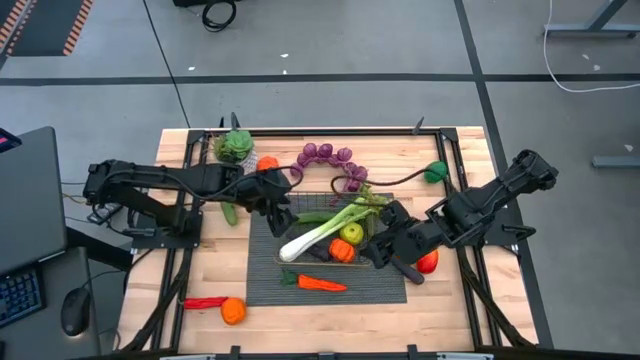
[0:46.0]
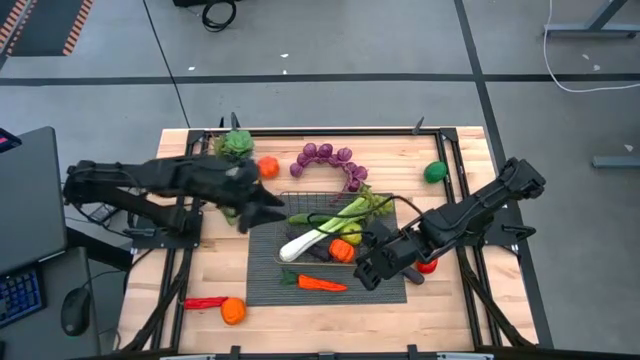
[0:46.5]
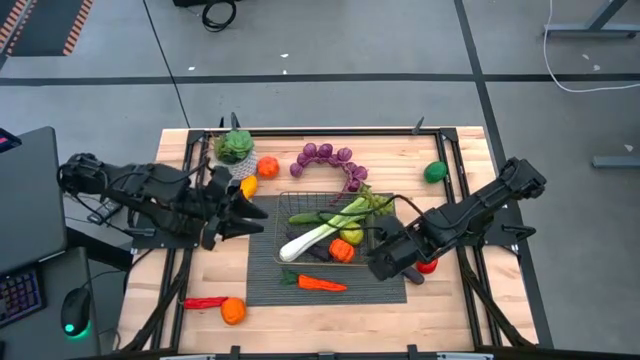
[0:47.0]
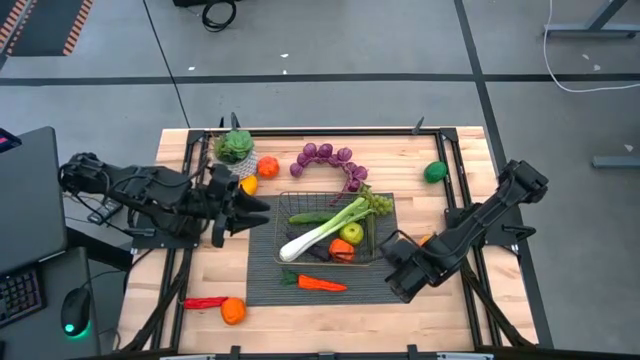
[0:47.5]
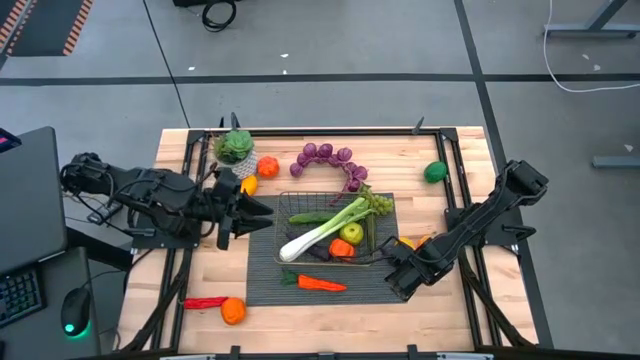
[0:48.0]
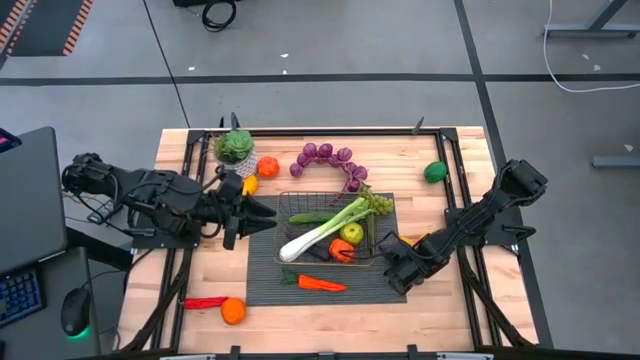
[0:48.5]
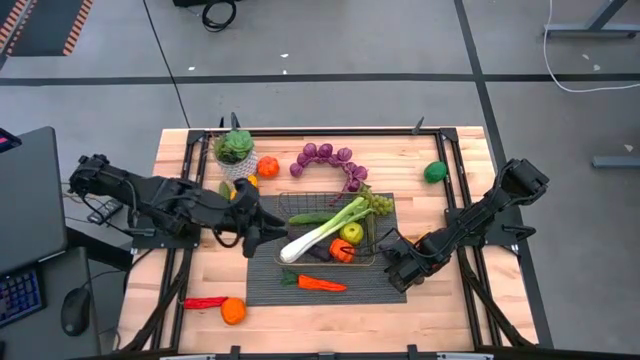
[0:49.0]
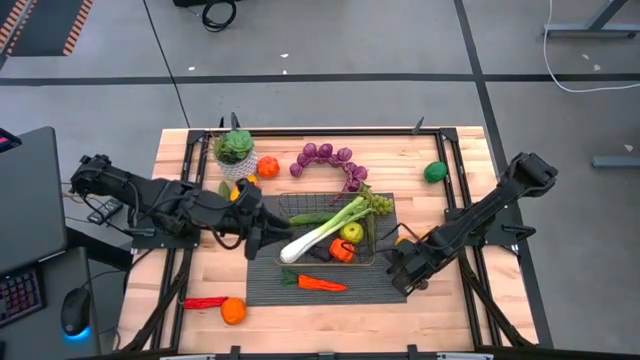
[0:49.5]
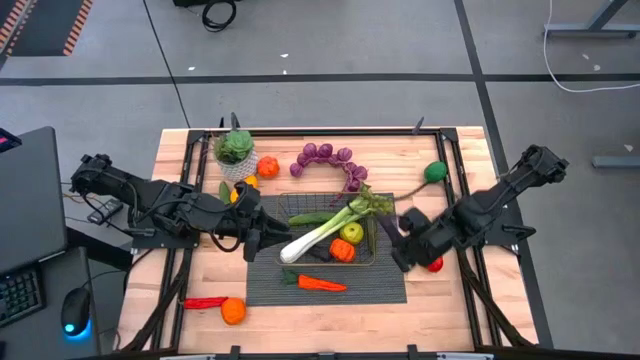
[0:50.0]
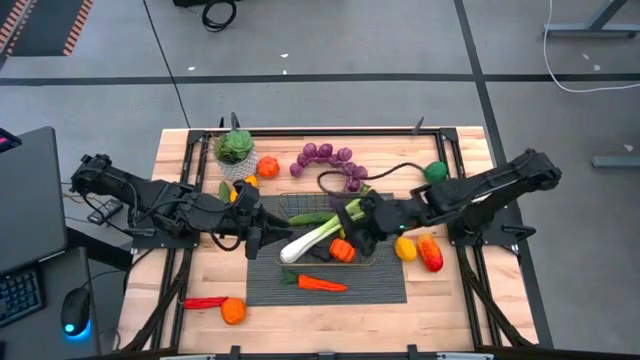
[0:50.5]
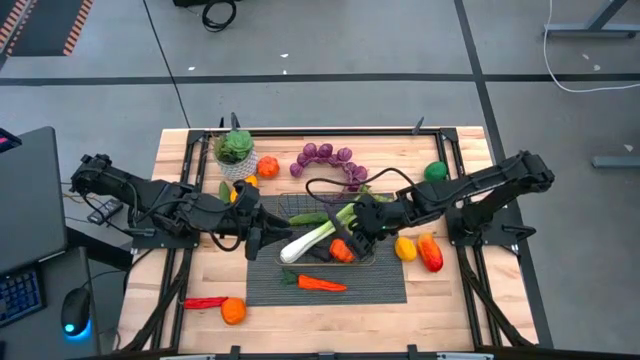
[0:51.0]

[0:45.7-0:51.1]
Task: Build produce basket
Put the purple eggplant into the gold wire basket

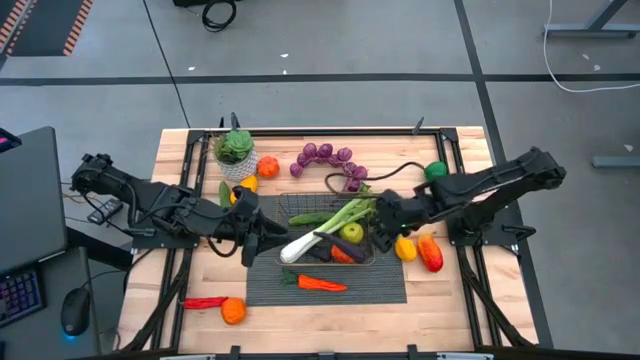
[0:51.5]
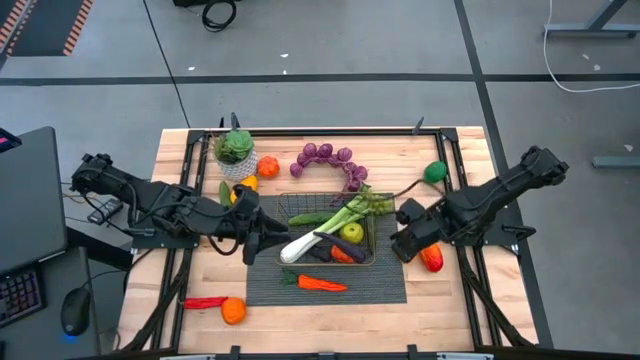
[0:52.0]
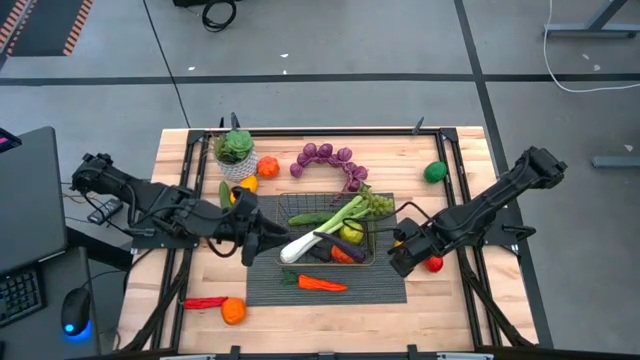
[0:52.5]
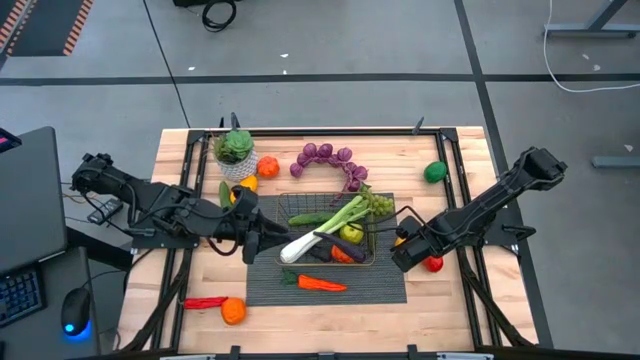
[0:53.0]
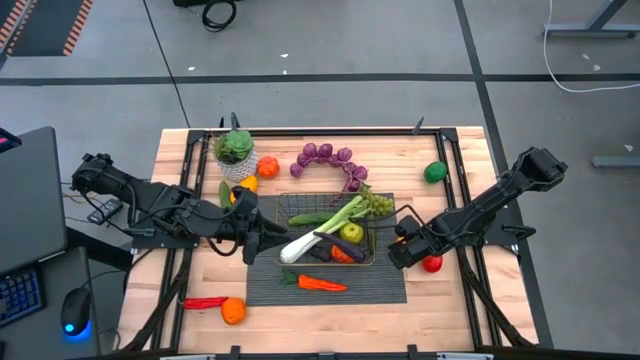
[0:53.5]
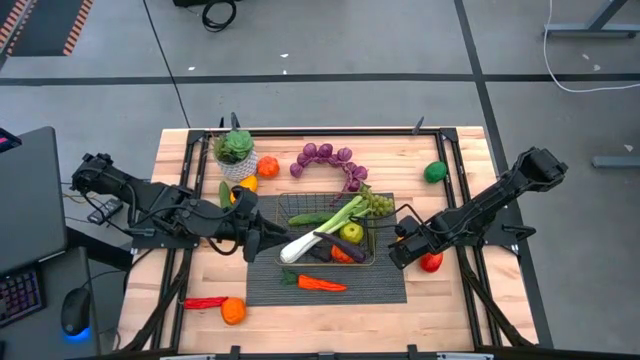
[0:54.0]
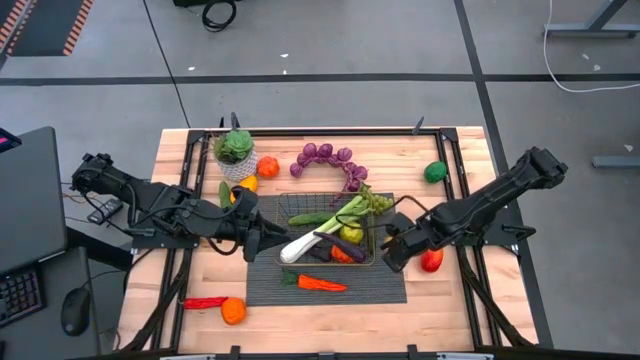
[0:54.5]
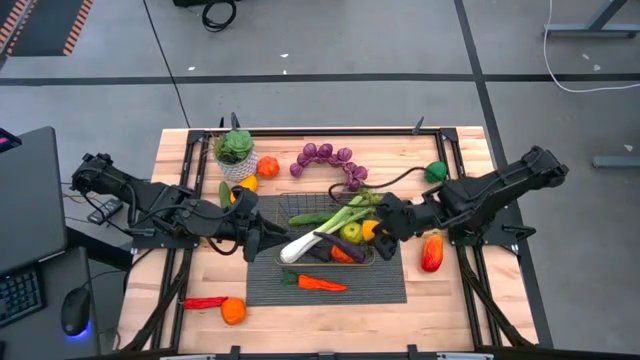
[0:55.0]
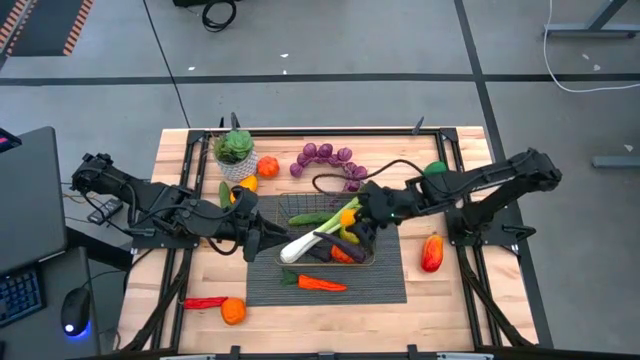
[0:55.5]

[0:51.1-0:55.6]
Put the yellow lemon into the gold wire basket

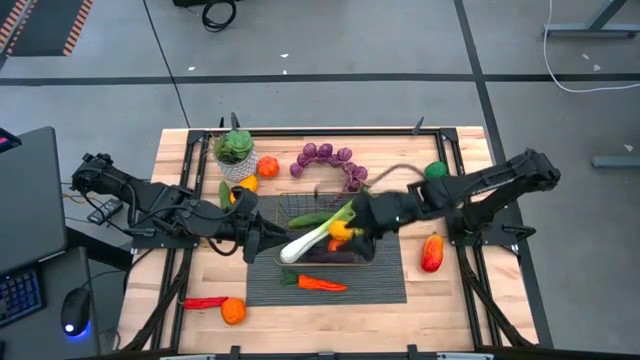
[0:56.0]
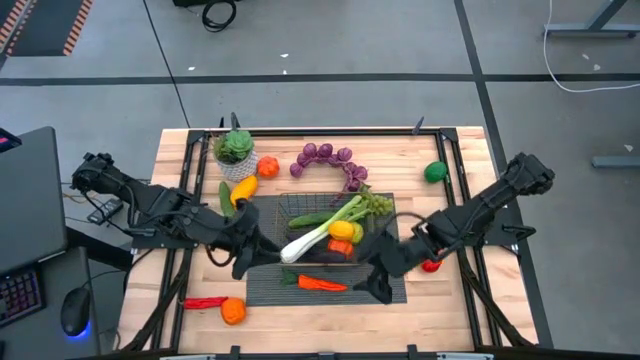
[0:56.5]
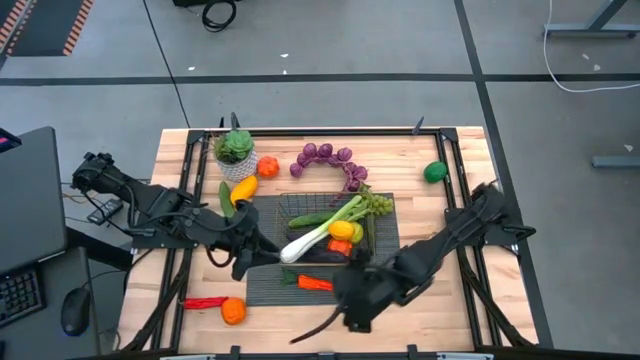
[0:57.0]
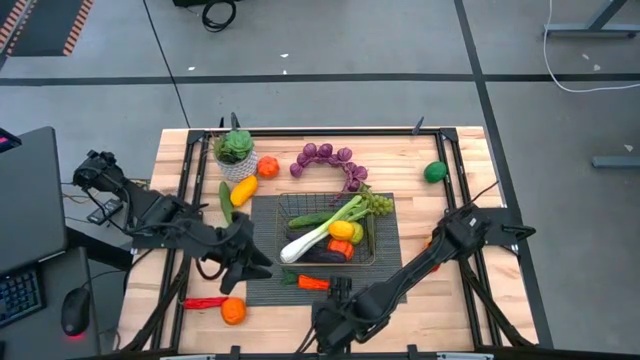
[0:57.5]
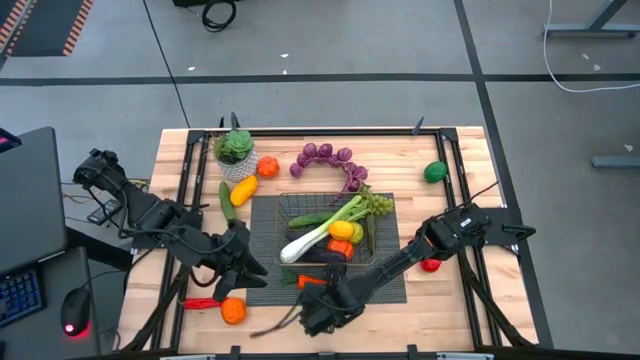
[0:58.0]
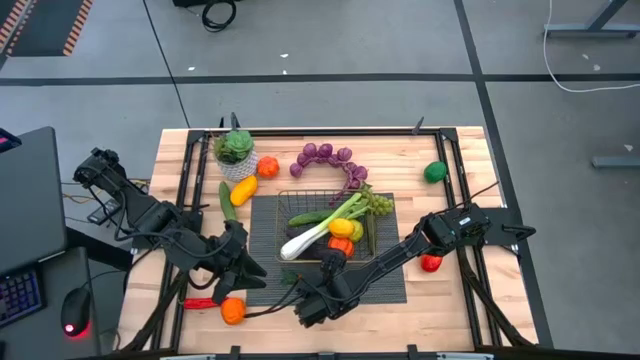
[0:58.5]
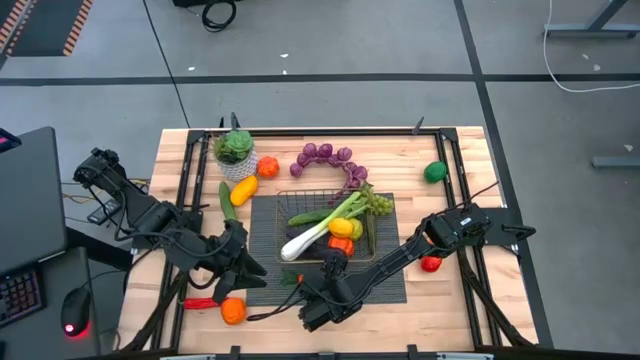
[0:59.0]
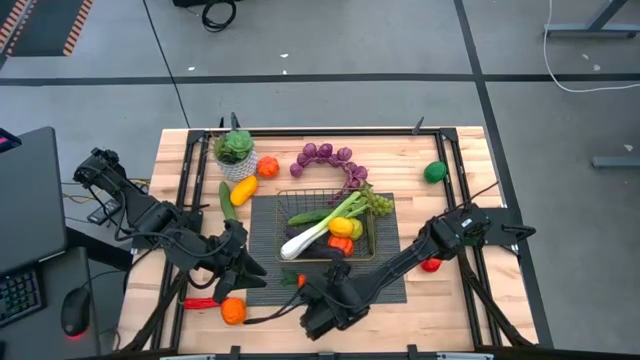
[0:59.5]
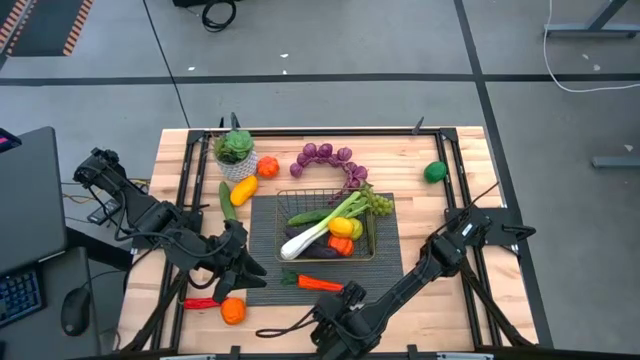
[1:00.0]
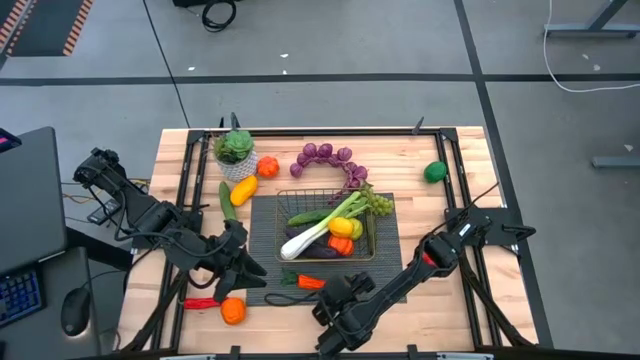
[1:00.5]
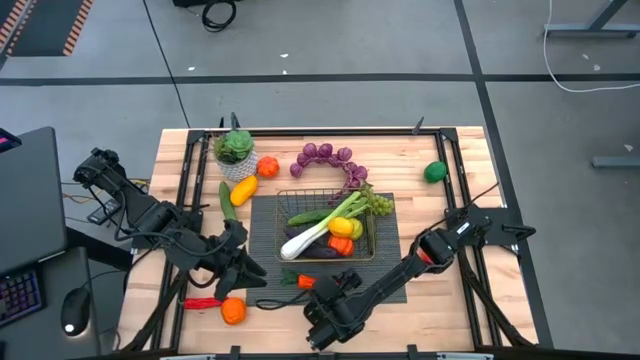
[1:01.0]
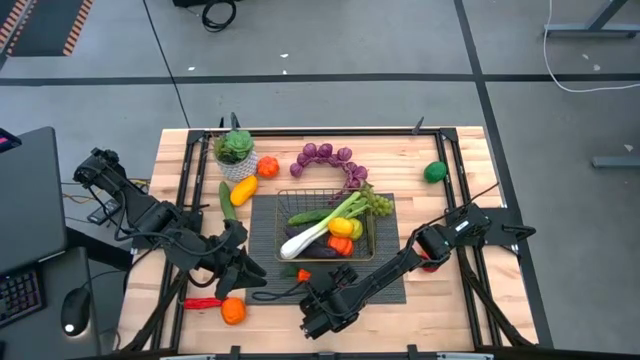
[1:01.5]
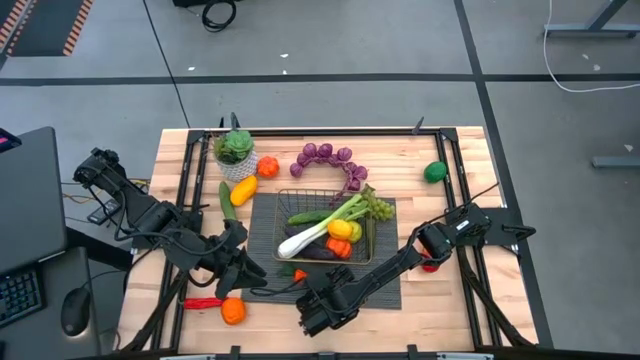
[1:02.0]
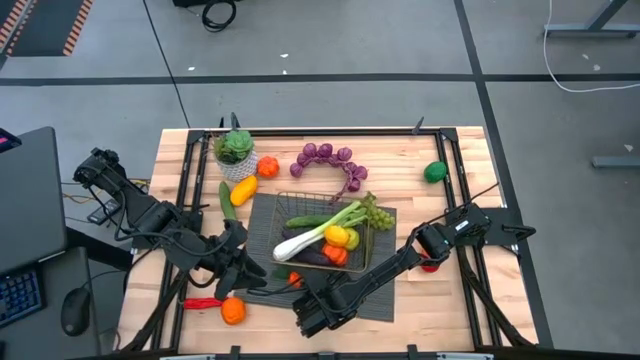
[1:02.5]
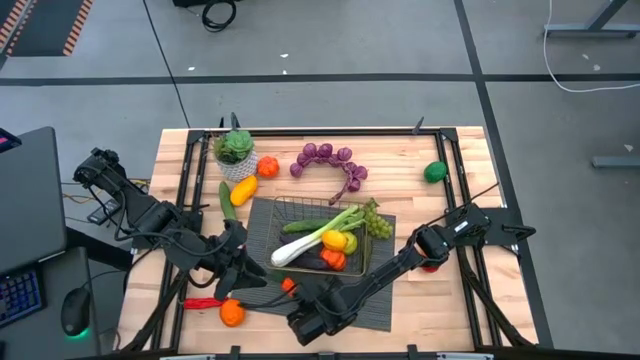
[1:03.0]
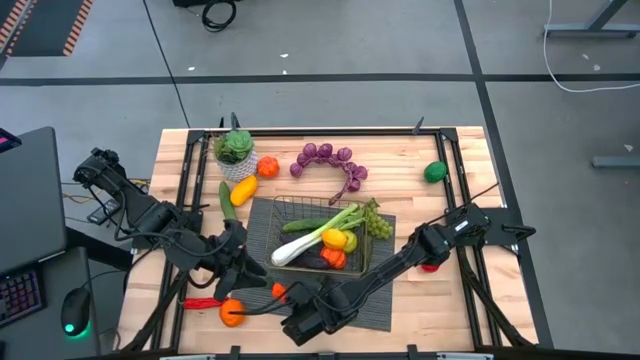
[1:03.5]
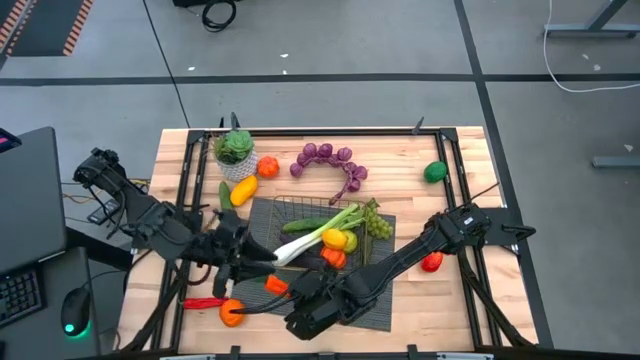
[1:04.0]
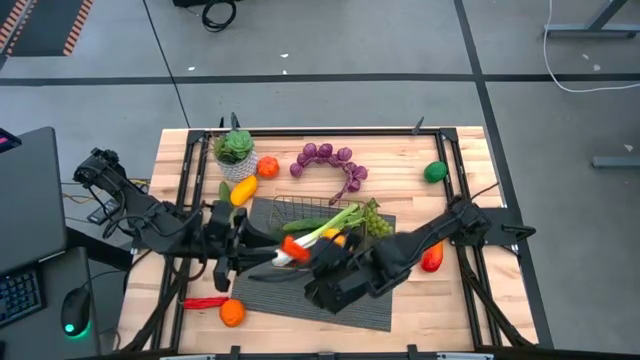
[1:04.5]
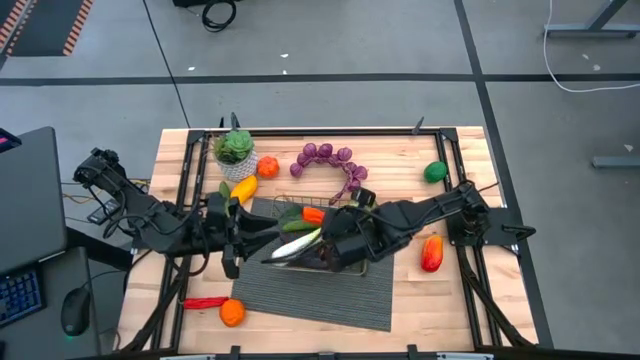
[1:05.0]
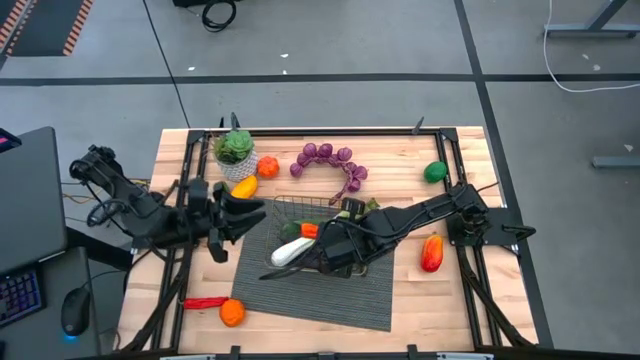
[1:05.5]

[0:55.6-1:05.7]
Put the orange carrot into the gold wire basket

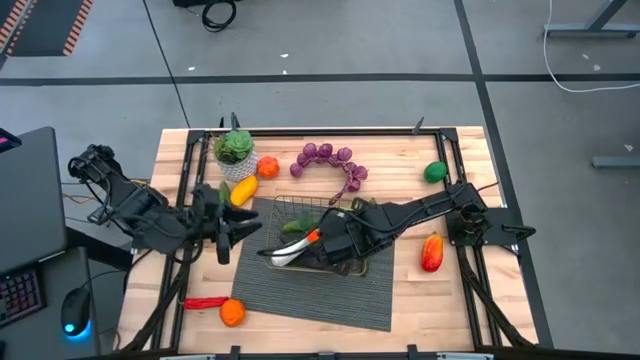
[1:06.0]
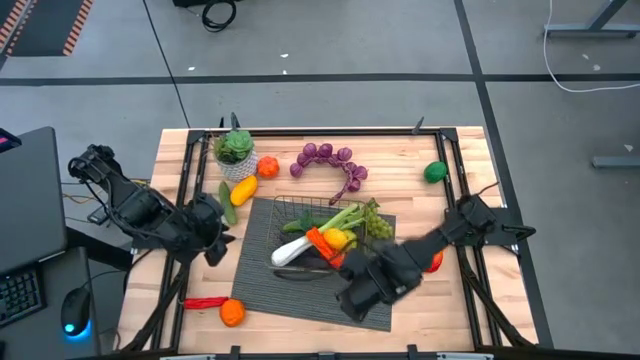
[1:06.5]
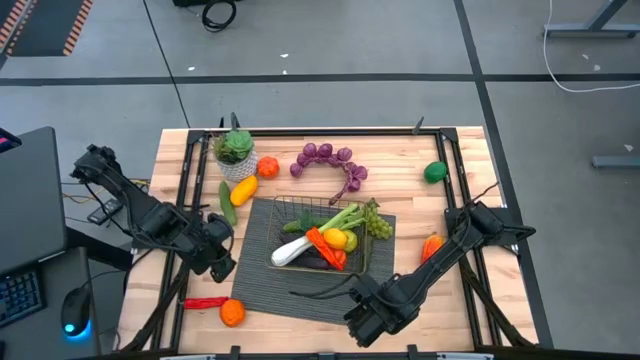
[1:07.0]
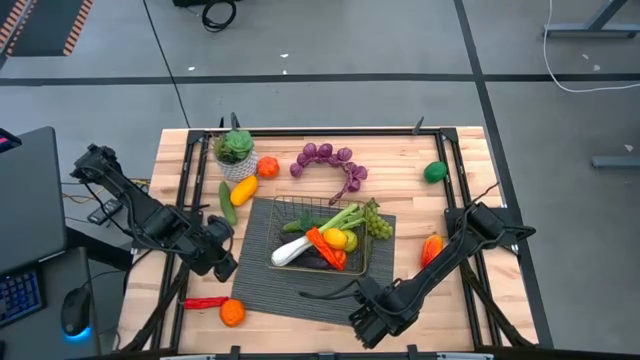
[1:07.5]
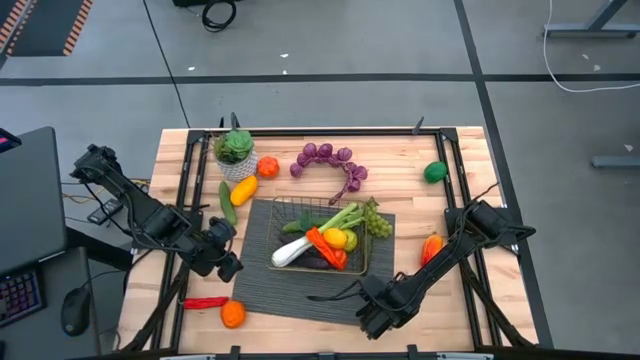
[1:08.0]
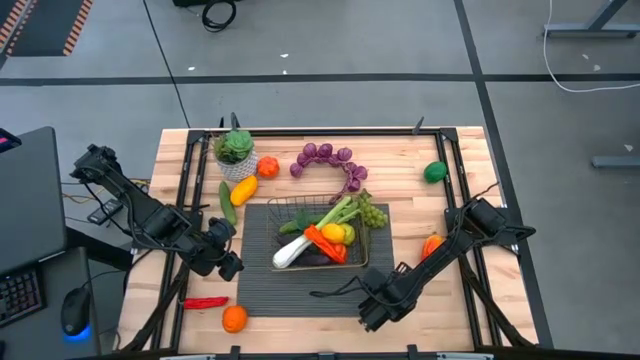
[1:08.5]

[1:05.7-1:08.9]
Adjust the gray mat on the table
